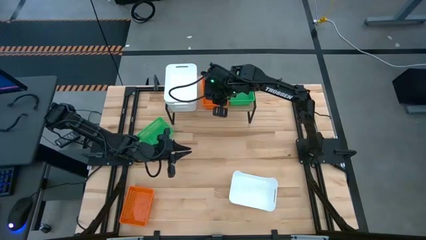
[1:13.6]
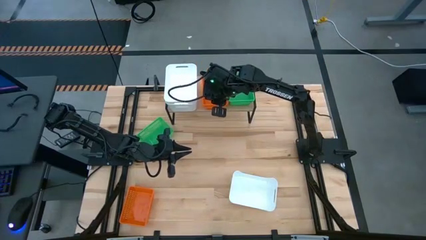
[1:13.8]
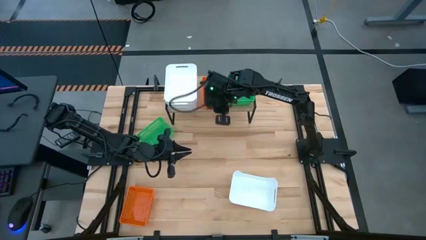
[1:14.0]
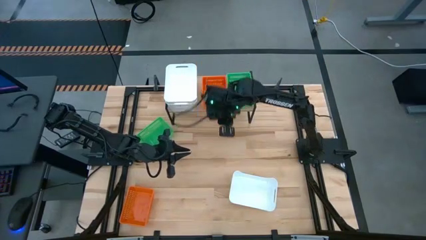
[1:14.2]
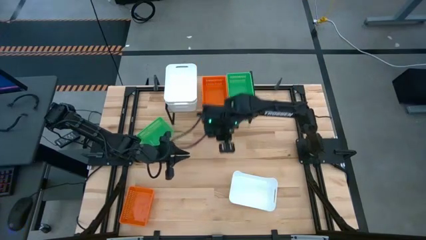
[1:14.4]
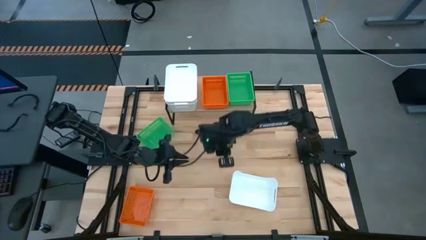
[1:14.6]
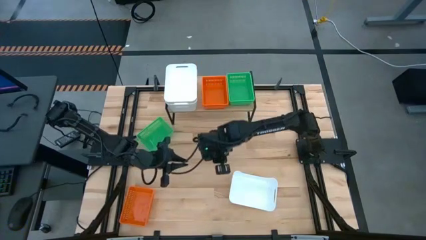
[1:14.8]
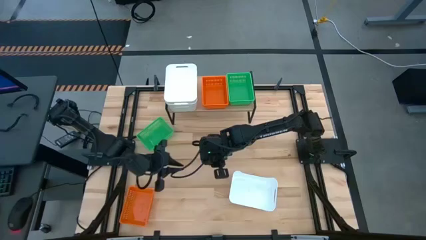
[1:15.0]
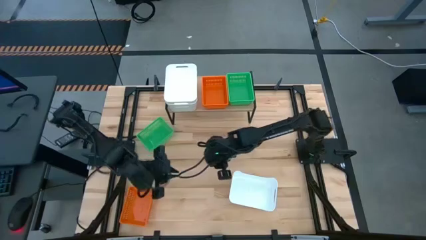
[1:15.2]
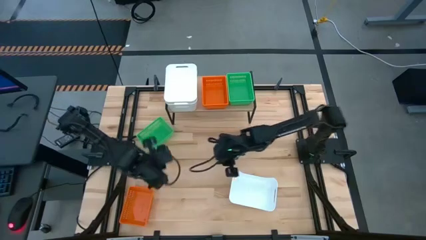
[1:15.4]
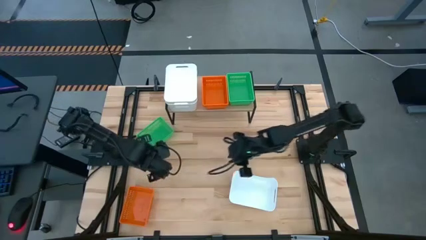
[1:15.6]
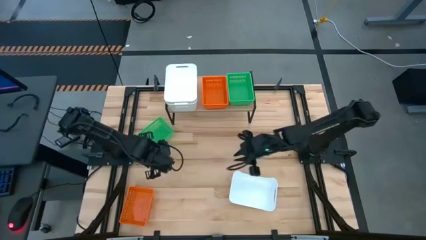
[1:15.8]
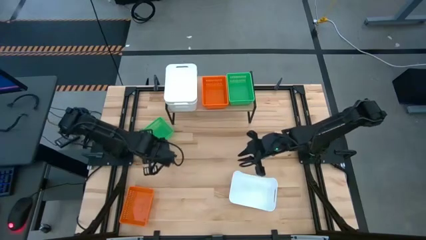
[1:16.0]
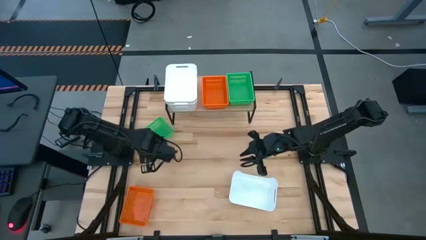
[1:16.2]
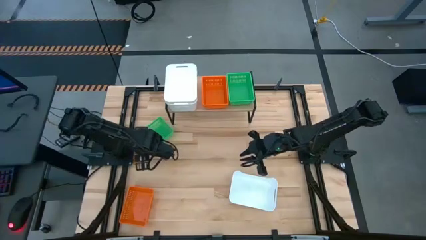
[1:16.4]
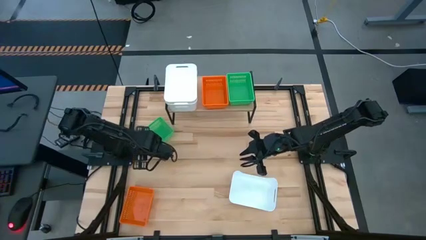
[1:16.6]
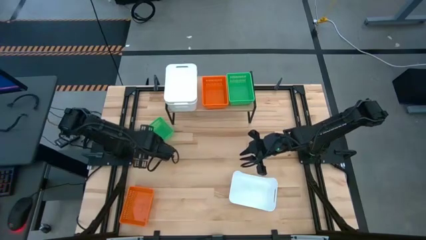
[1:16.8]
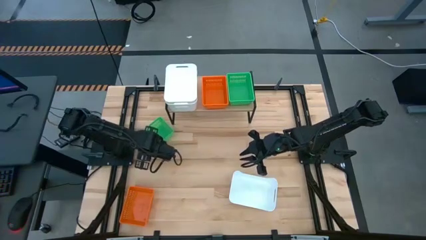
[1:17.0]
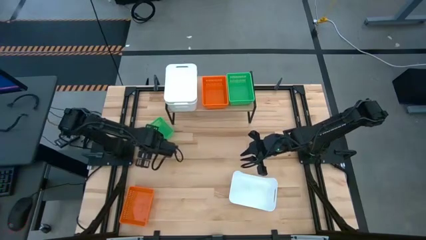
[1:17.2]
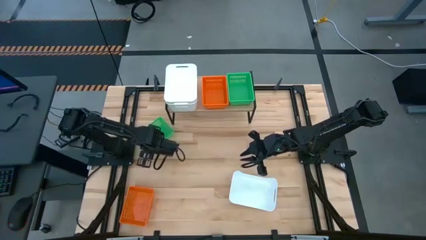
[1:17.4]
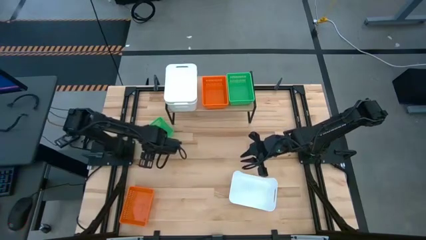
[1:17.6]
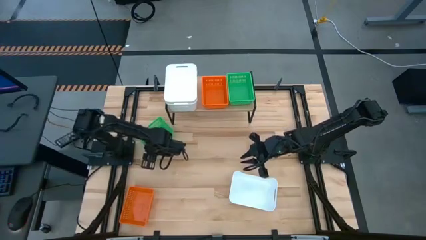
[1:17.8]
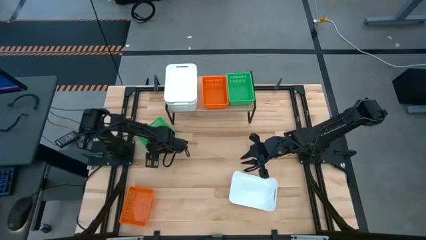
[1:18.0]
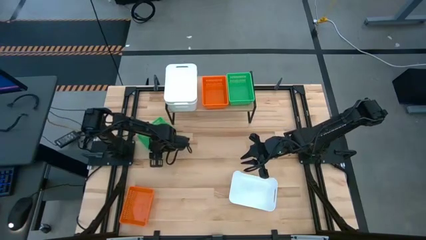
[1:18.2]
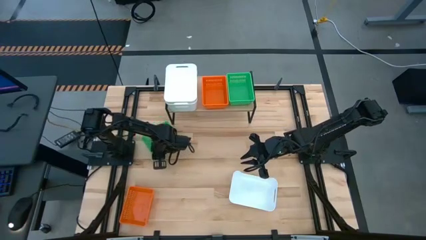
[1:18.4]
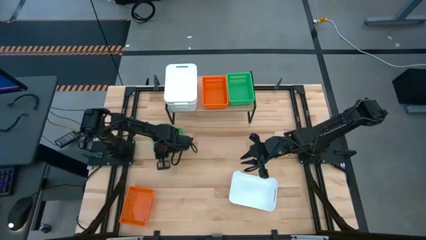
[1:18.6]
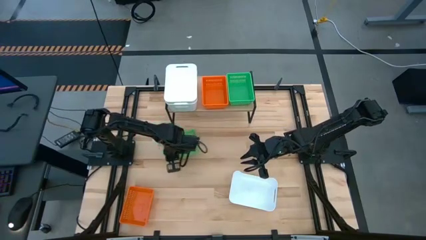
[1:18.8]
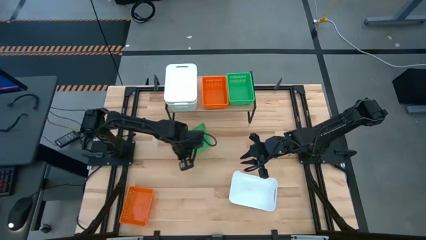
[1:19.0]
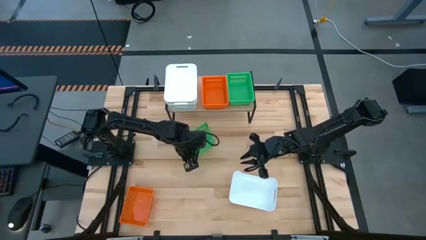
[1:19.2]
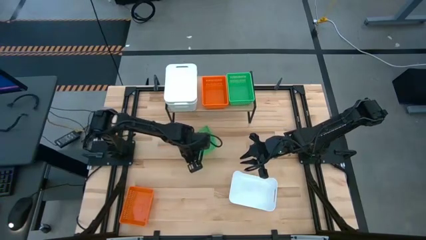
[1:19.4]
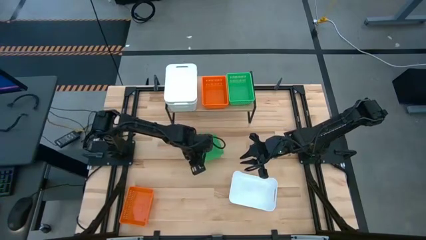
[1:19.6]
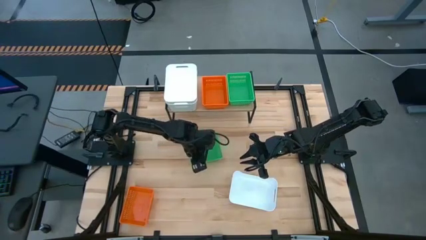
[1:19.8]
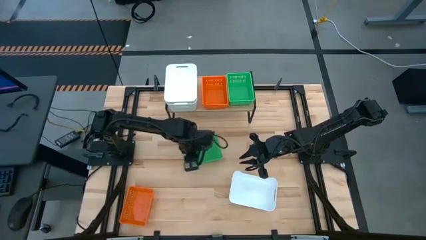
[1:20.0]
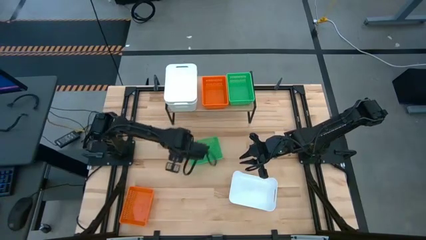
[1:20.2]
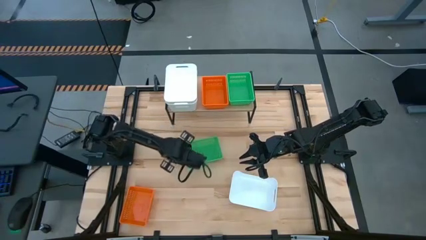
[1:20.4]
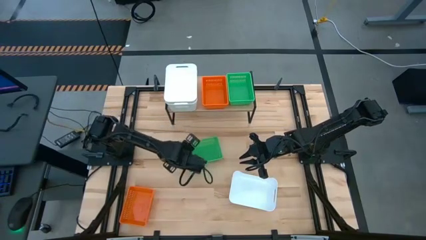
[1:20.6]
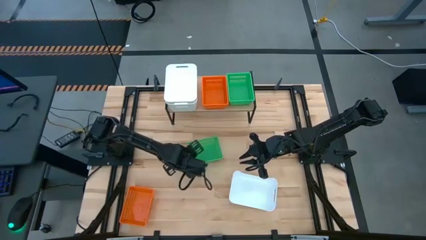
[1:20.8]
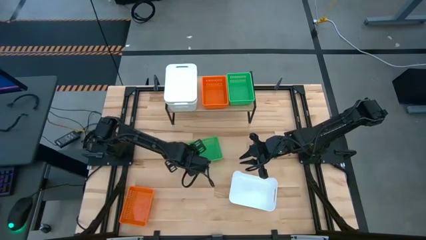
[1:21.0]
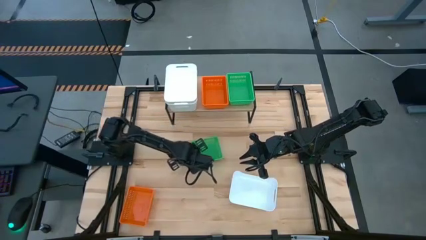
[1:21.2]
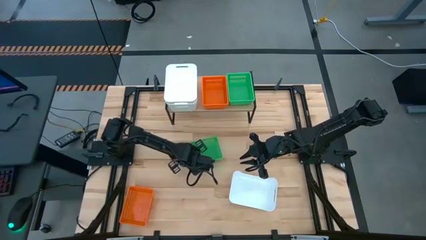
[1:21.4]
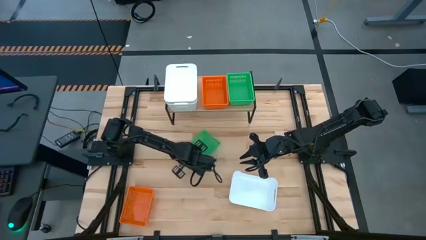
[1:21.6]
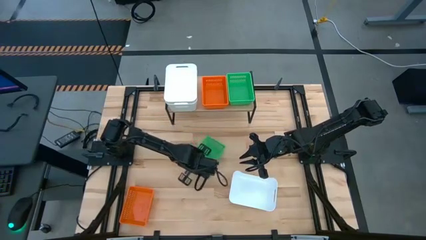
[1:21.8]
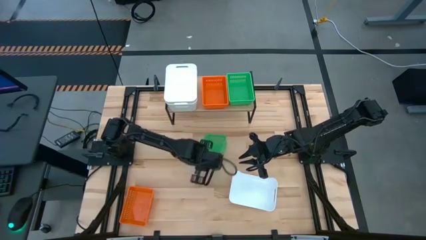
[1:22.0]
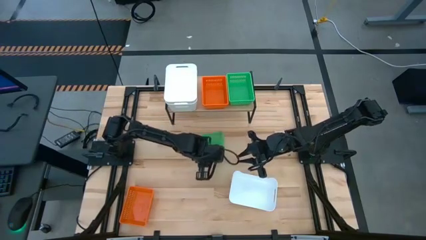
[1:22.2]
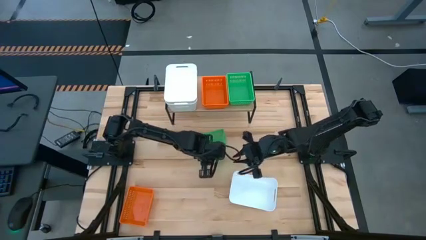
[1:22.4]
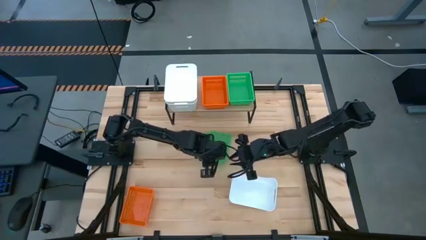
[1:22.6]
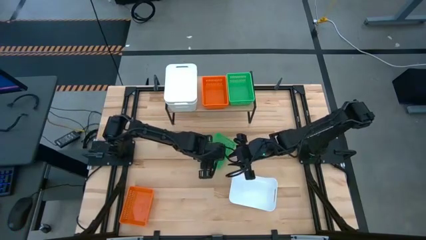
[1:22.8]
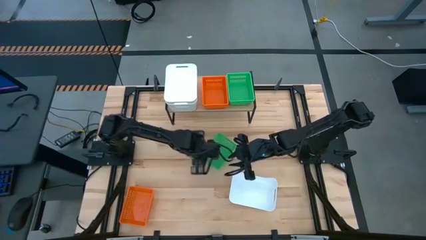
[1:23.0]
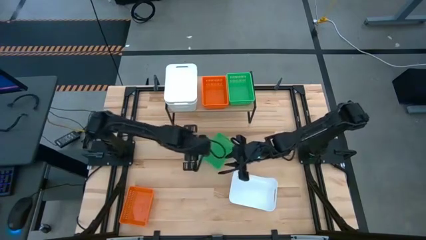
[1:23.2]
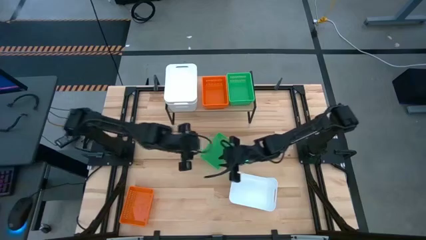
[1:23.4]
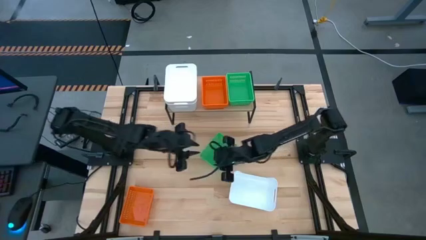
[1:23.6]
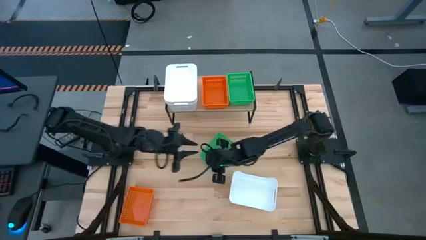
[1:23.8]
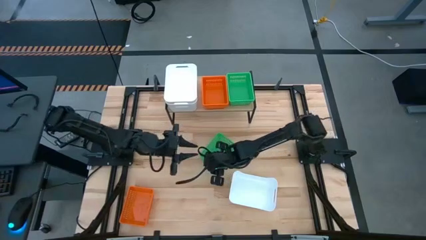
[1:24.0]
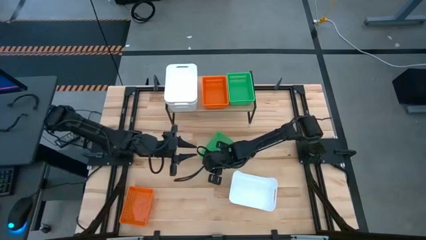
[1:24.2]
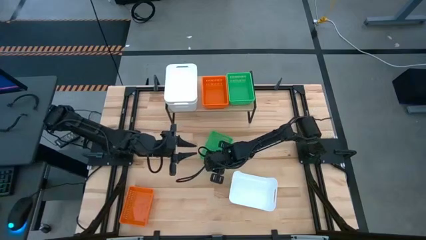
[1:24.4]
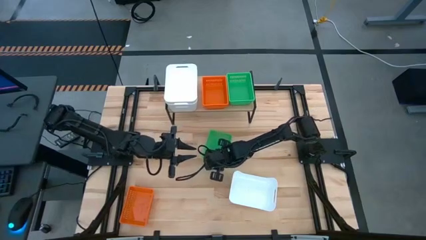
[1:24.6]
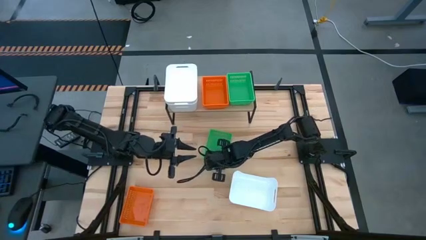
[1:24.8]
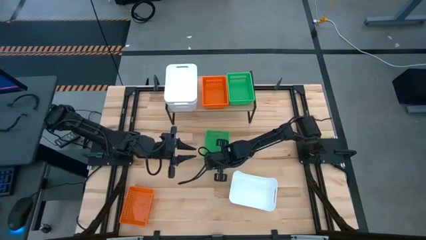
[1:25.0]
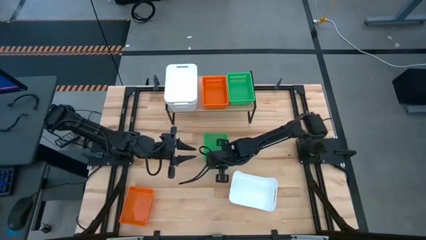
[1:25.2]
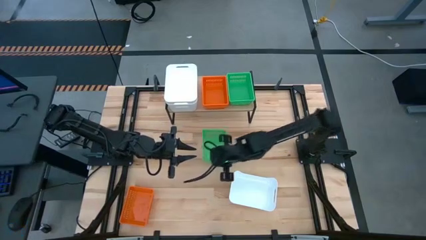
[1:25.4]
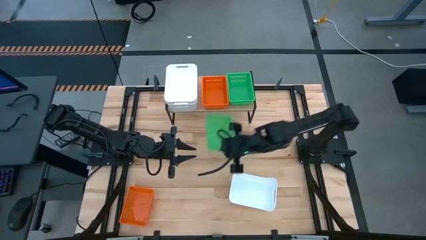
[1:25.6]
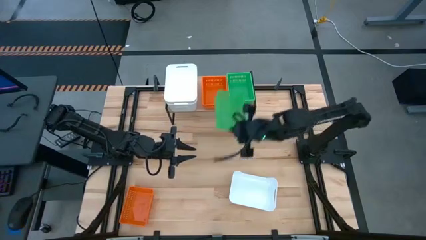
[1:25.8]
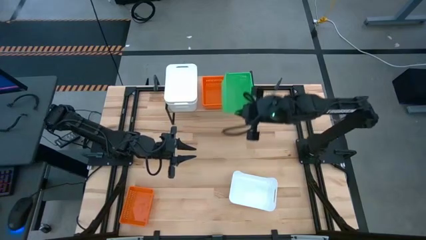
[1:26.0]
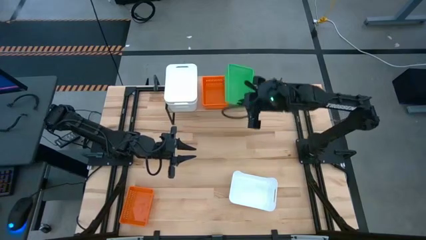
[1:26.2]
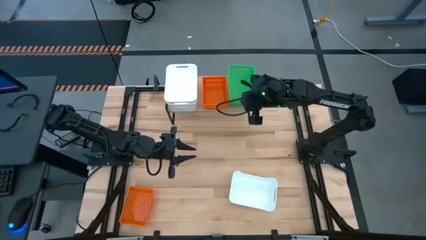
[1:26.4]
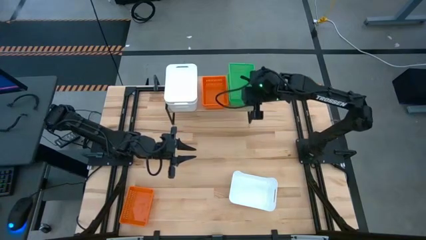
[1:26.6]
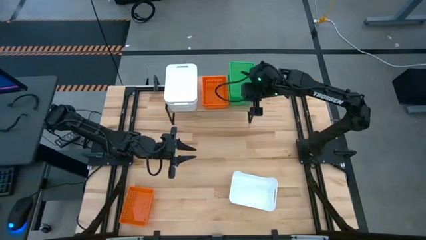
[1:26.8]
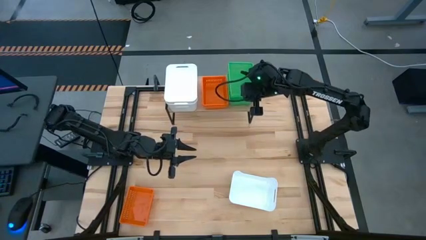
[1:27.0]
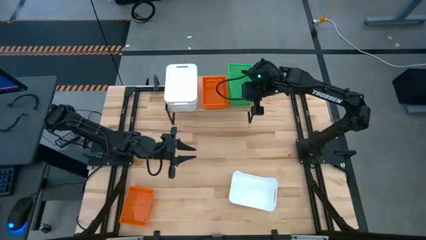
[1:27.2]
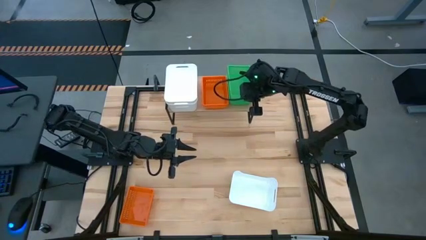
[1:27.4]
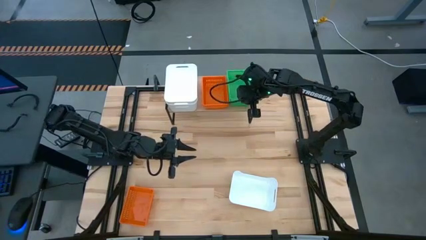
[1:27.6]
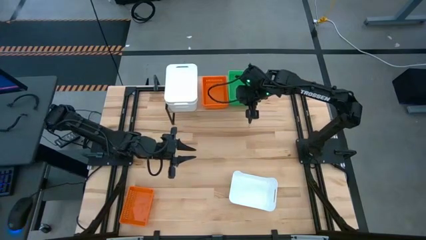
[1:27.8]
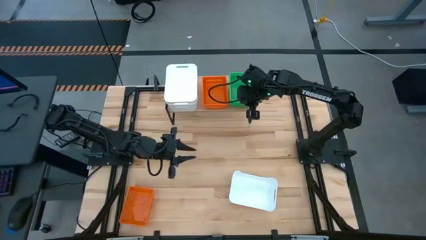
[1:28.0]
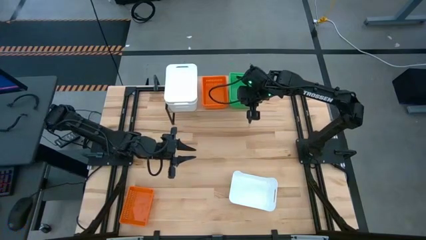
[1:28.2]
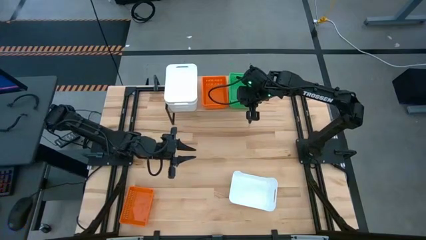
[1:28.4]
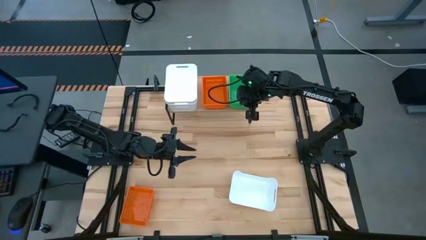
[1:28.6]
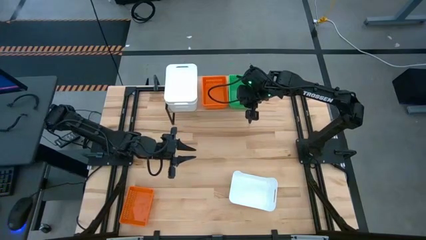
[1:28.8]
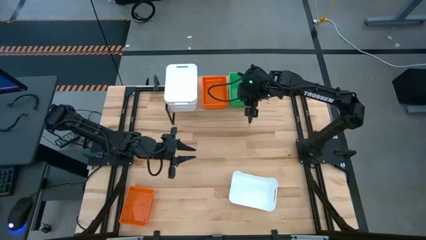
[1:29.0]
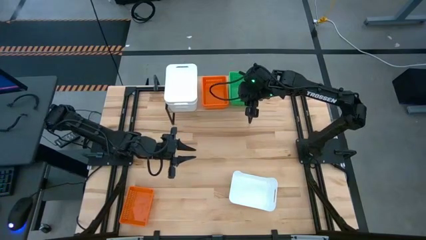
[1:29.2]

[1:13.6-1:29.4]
Task: Stack baskets on shelf by color
Stack the green bin on top of the green bins on the shelf

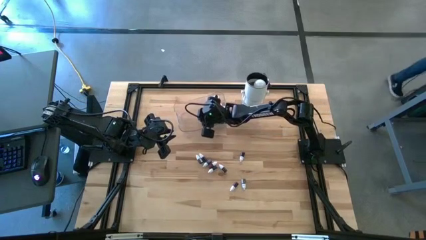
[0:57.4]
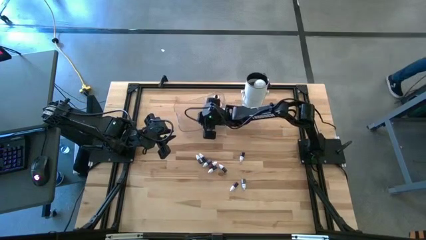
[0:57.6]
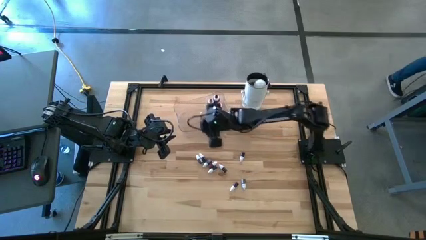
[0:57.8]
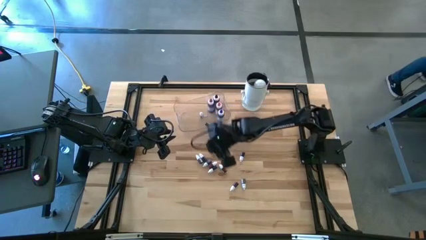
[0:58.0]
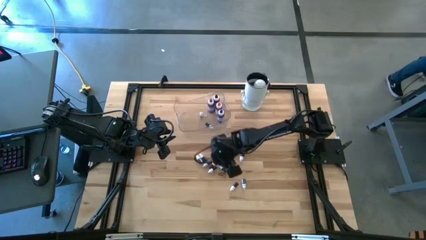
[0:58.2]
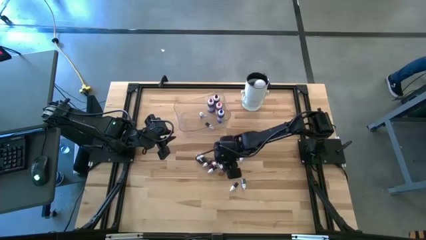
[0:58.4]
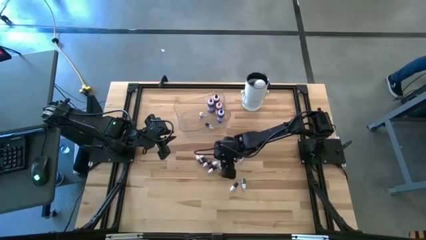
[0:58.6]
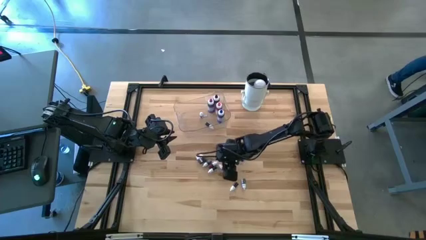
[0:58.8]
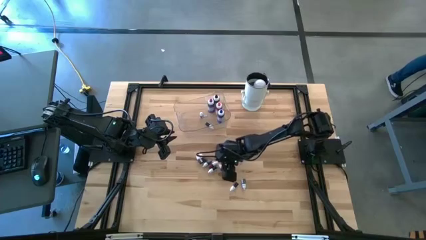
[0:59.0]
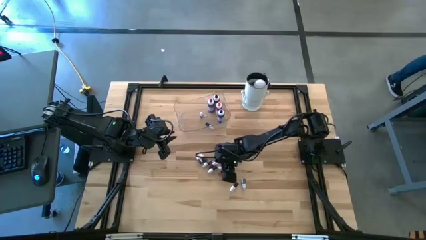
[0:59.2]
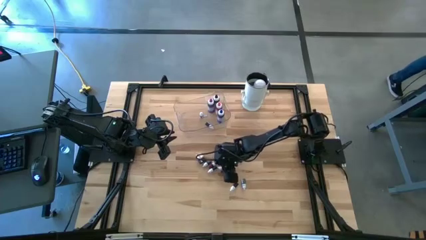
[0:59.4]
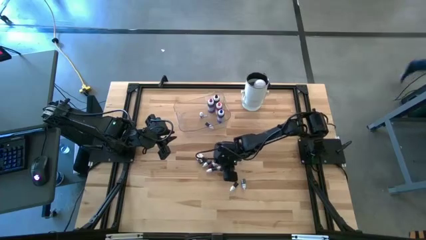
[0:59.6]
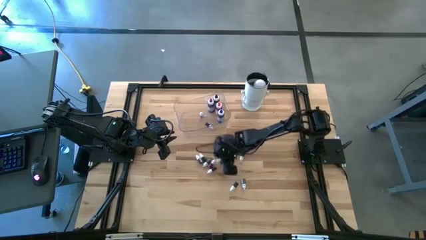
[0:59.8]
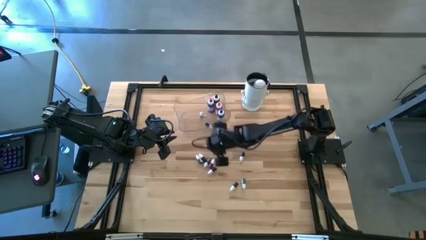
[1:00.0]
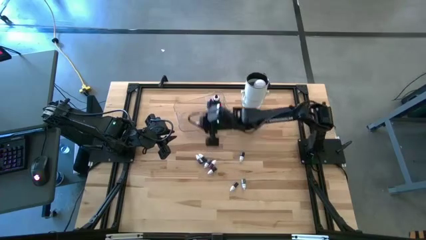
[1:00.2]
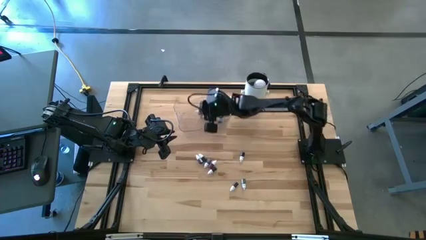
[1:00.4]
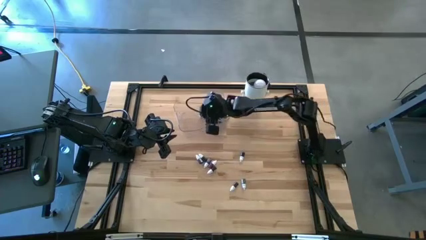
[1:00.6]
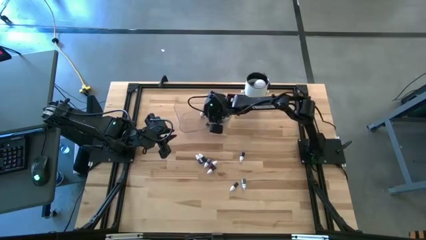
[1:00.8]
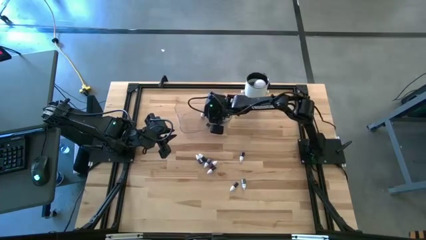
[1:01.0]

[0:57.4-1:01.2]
Task: Pick & Place food coloring
Put the small red food coloring bottle into the transparent container
